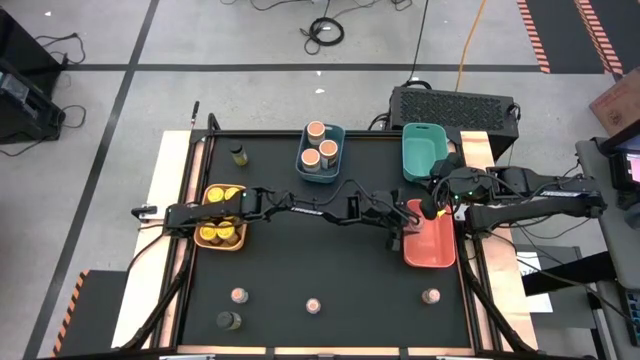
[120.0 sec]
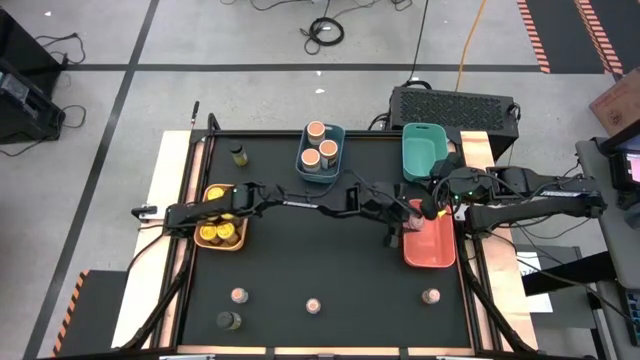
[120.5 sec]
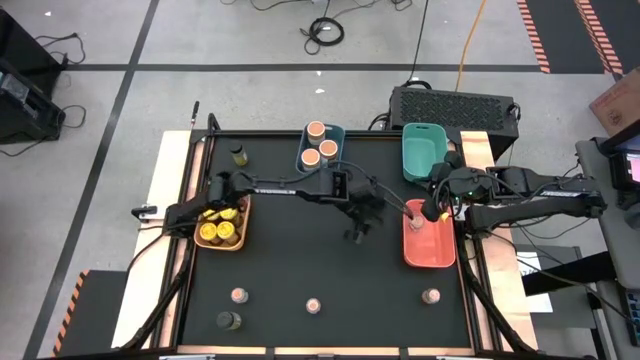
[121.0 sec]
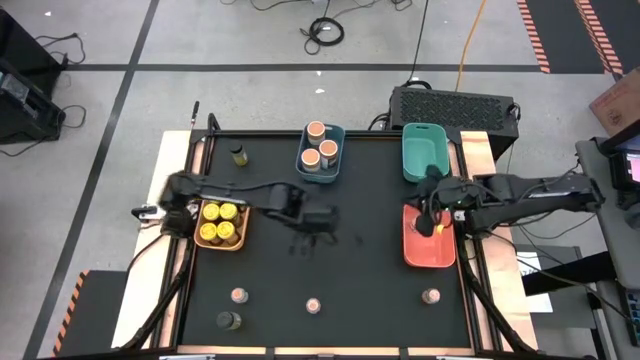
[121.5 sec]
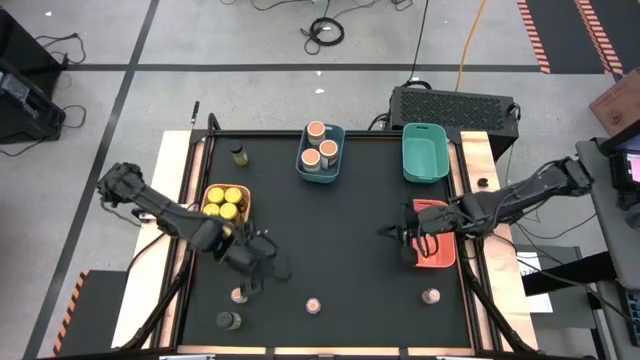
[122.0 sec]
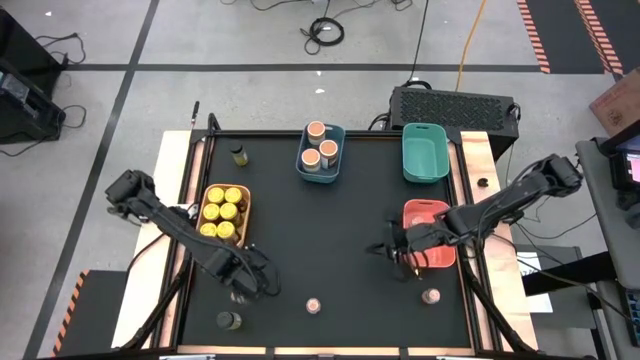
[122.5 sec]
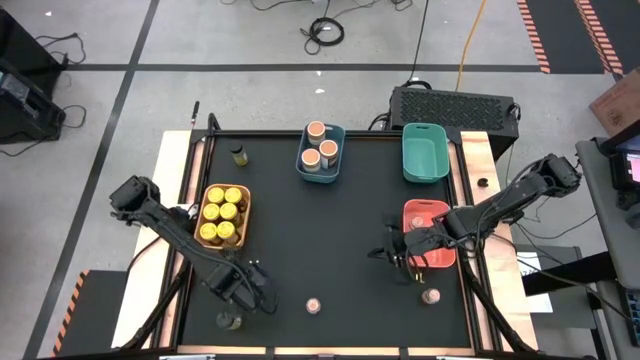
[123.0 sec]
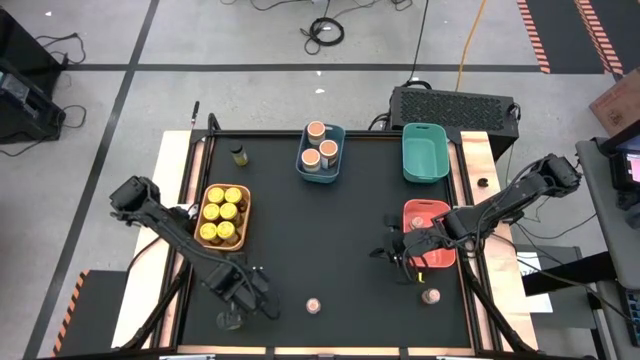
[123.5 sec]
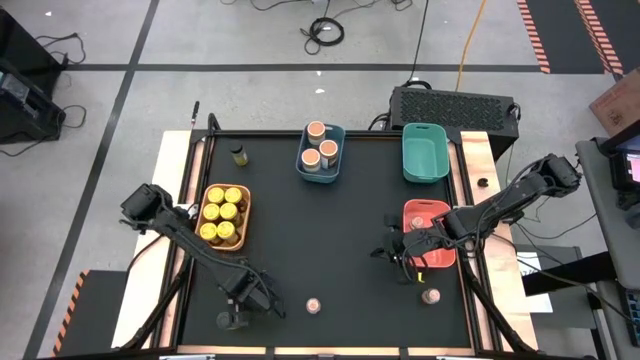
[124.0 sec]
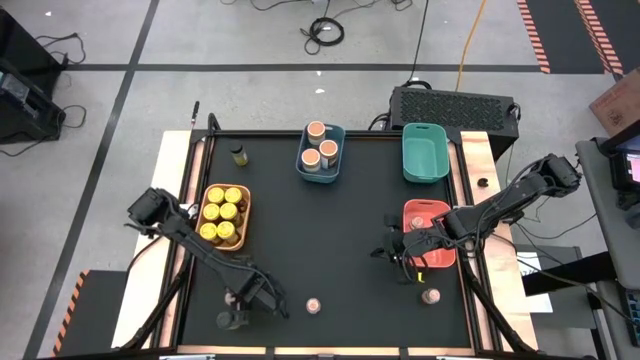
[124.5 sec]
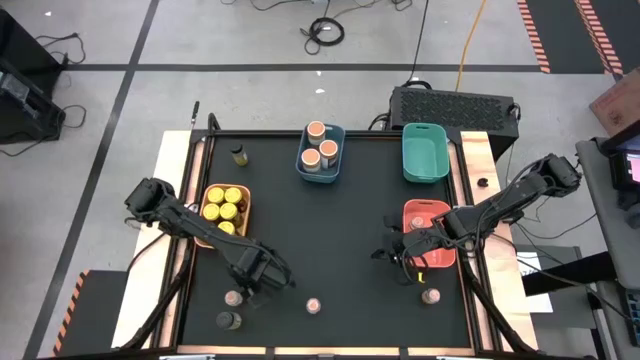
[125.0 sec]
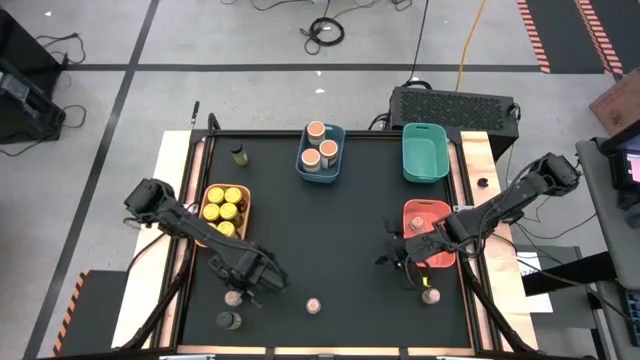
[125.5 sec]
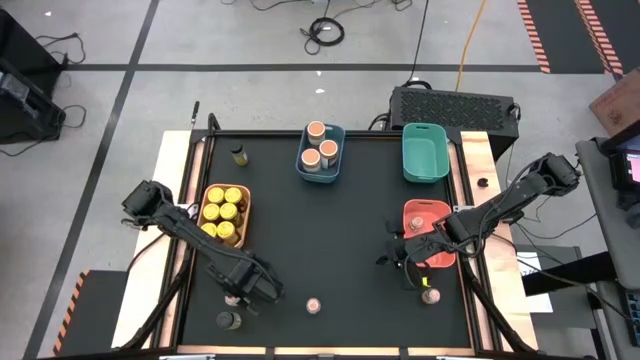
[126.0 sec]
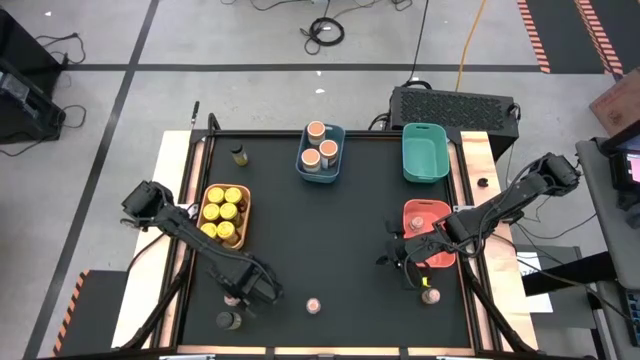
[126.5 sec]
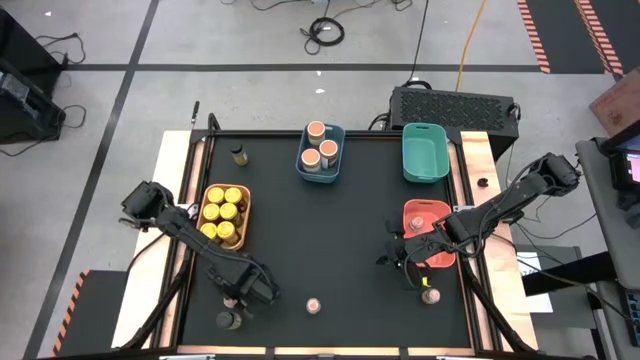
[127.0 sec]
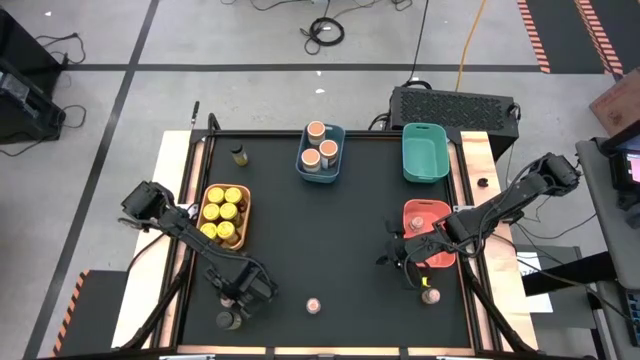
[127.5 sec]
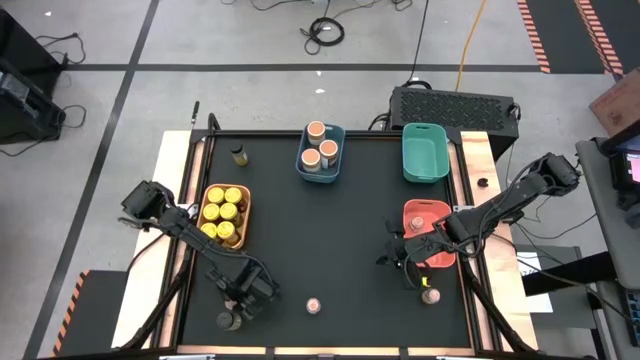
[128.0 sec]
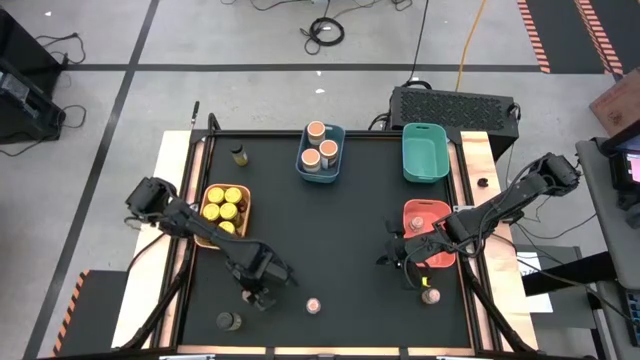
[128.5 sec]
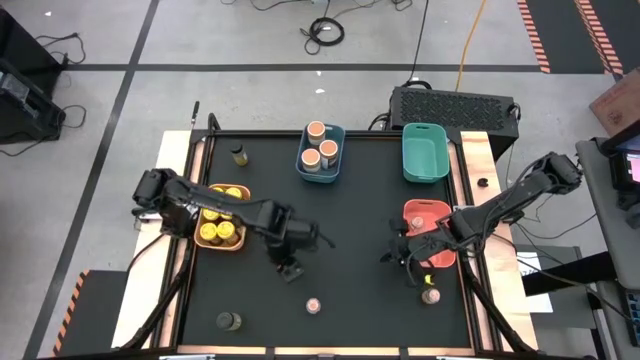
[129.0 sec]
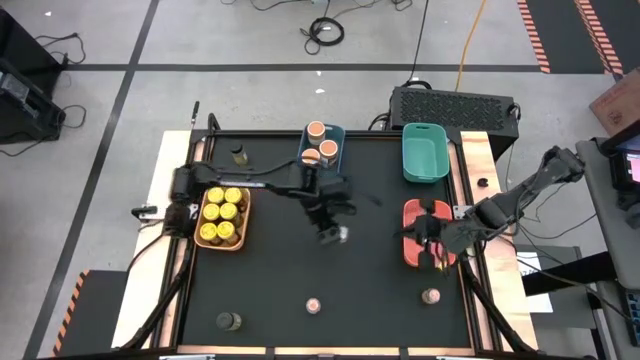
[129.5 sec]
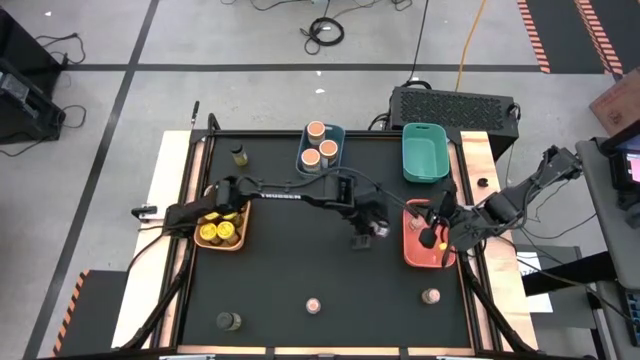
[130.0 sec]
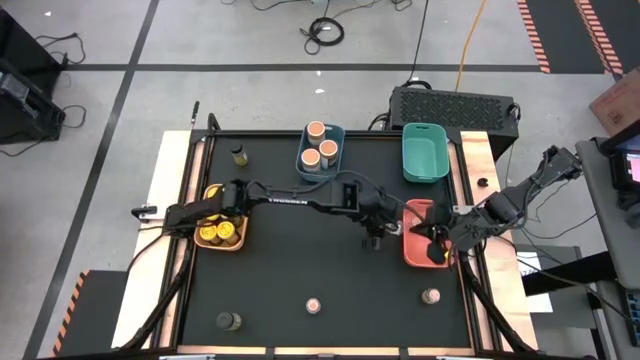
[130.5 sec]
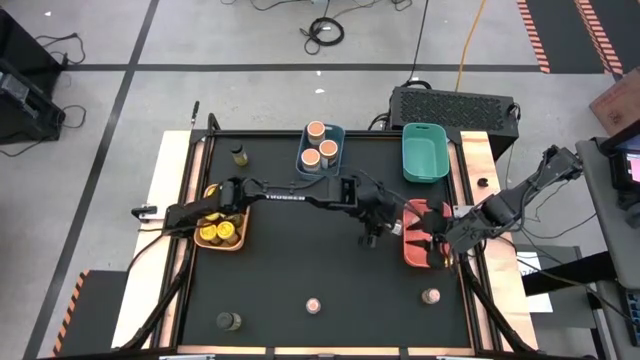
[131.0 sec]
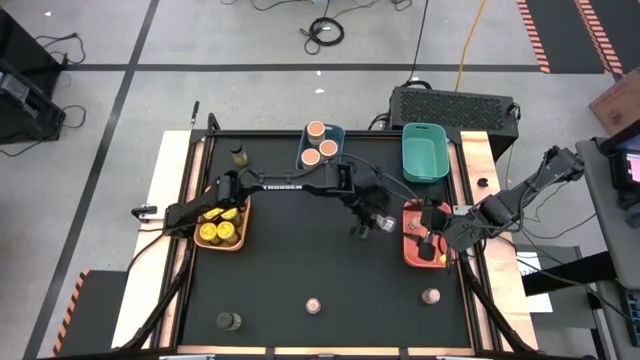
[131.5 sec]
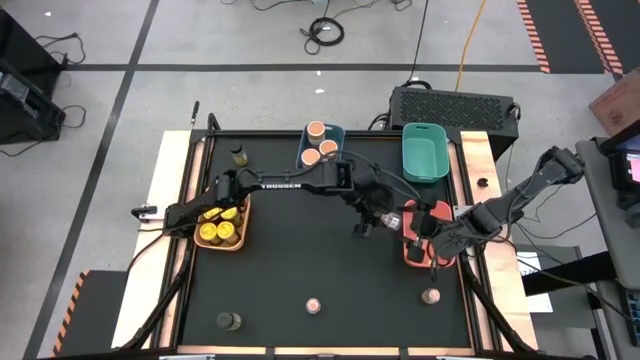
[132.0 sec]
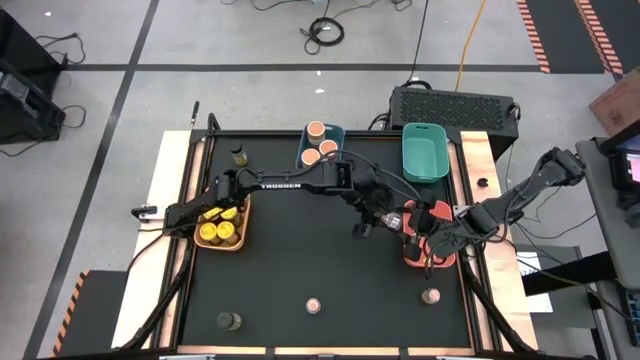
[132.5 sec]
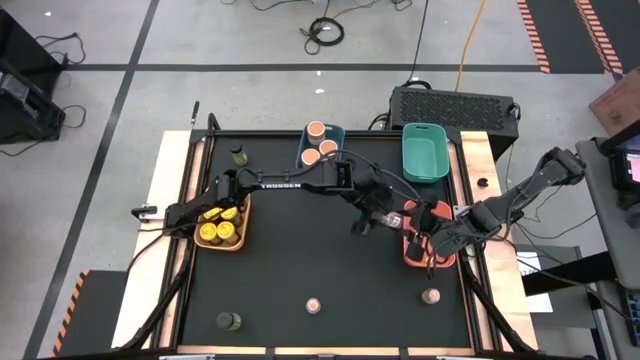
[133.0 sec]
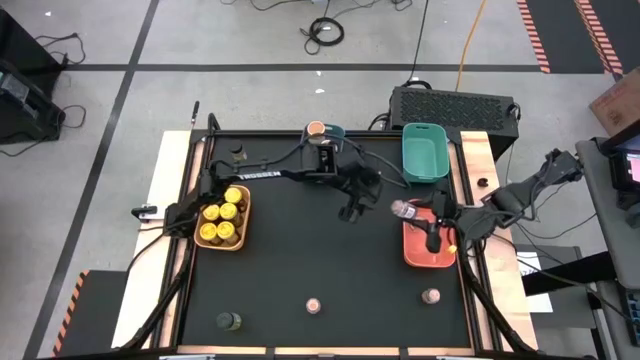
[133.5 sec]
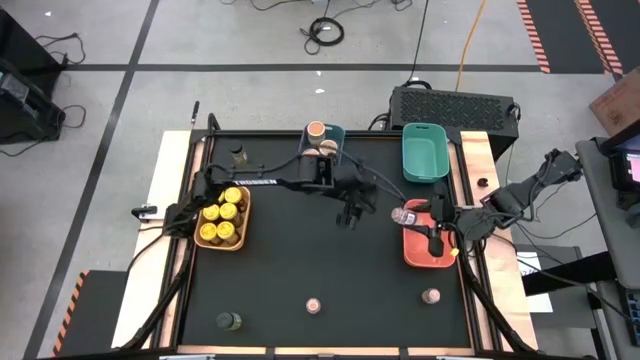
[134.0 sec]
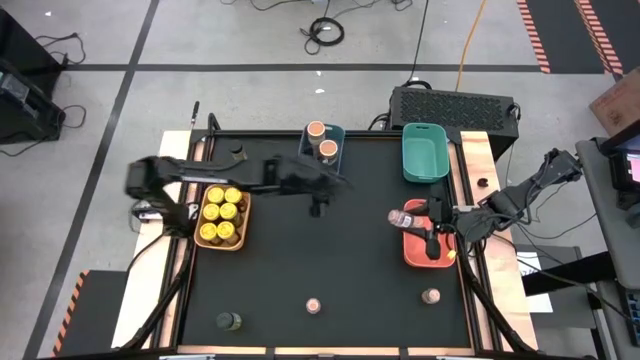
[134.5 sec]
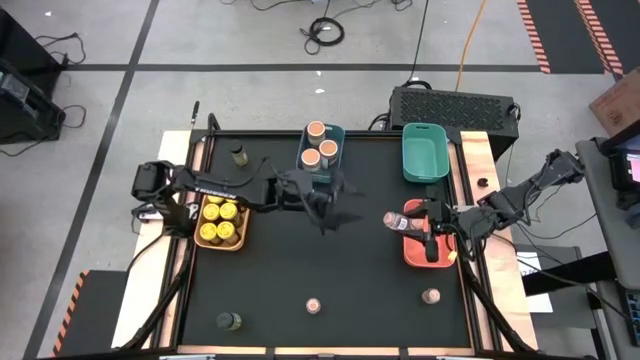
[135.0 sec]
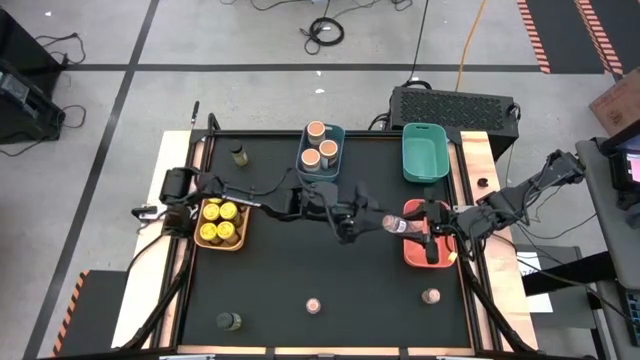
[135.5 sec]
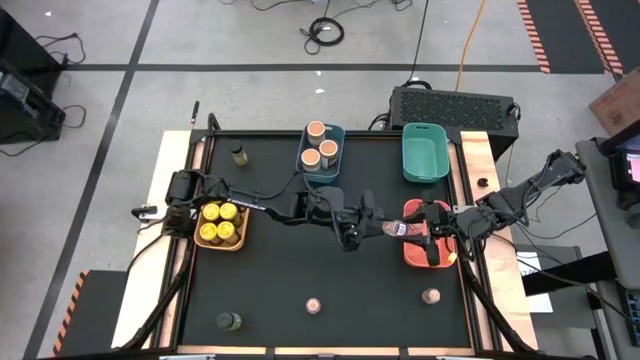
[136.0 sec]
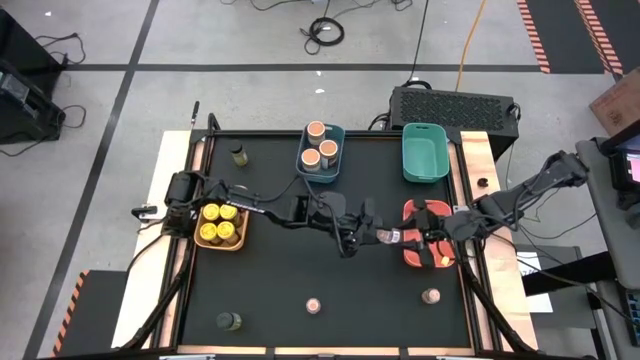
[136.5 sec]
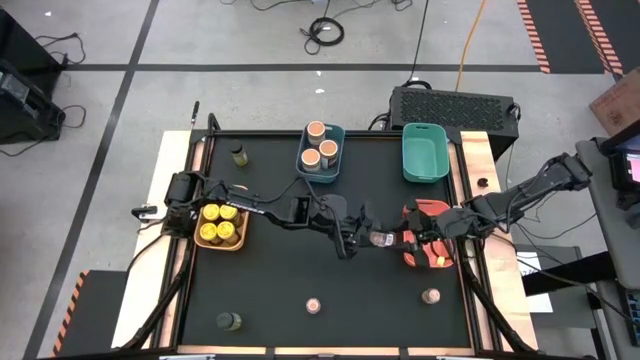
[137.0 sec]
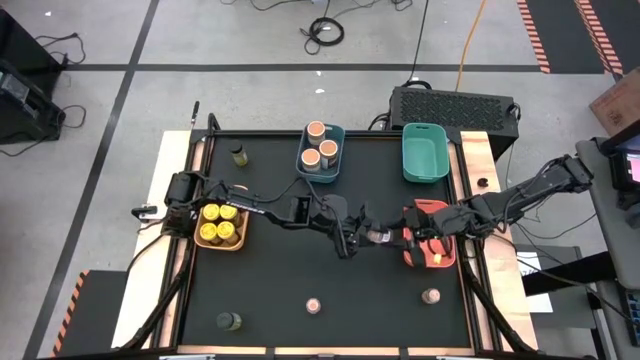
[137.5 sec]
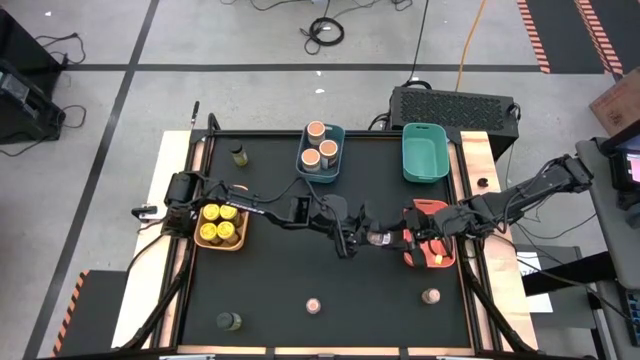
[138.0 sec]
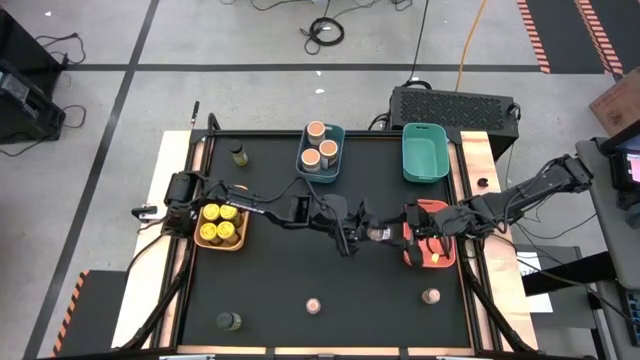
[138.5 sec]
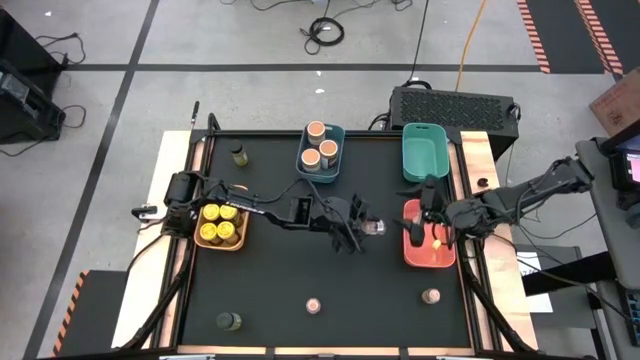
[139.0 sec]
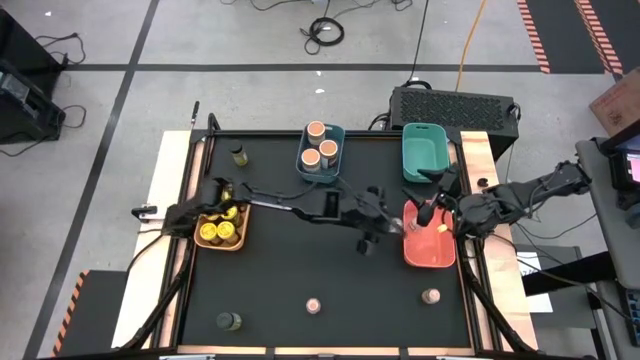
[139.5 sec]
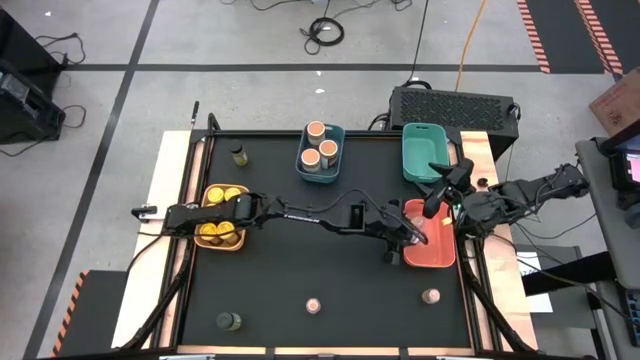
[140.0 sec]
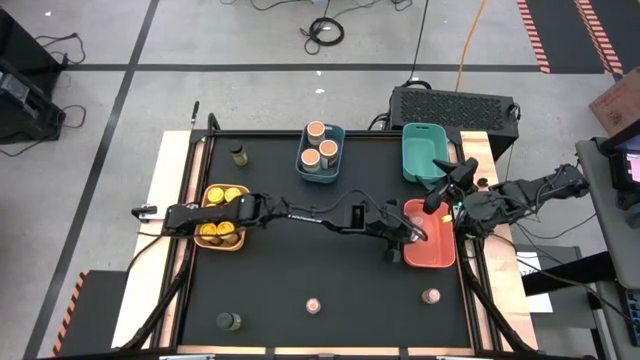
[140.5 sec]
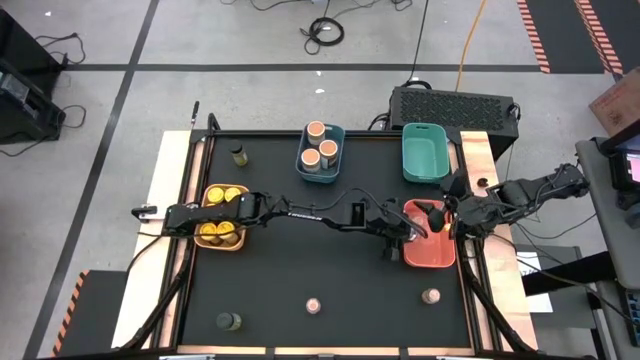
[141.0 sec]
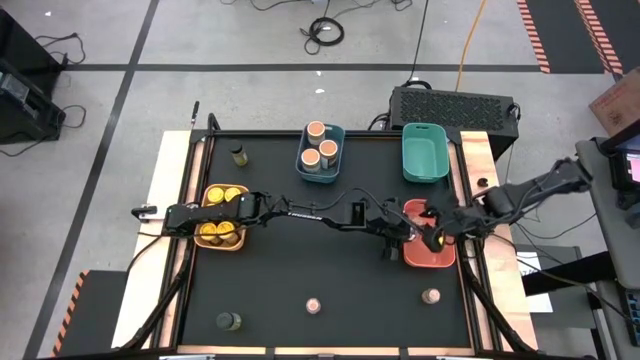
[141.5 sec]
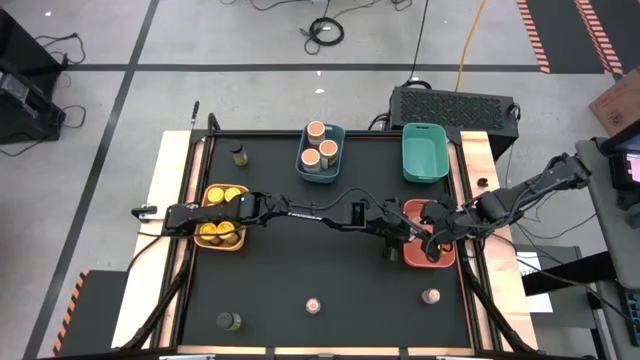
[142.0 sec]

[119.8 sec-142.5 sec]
Task: Sort spices by type
Put the small brown seasoning bottle into the orange bin
